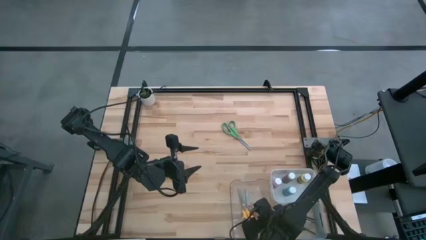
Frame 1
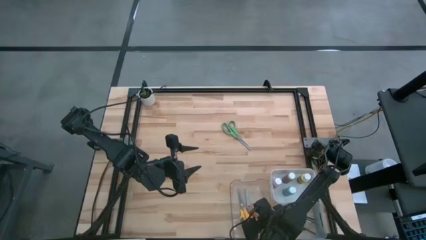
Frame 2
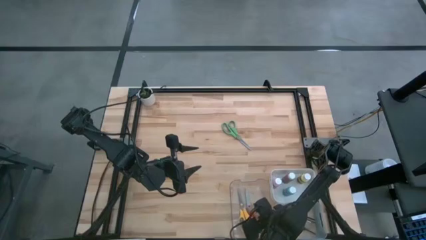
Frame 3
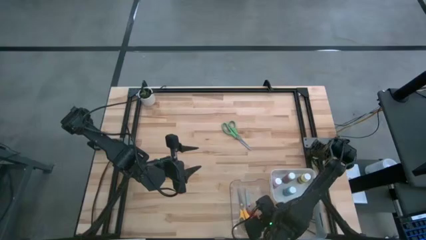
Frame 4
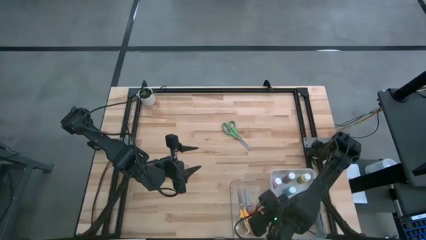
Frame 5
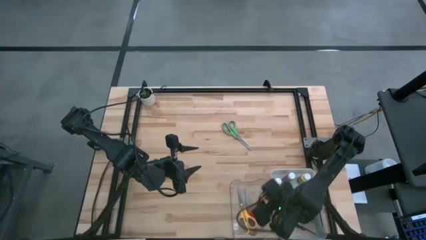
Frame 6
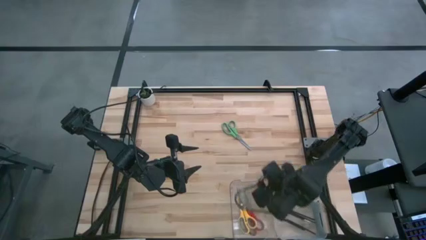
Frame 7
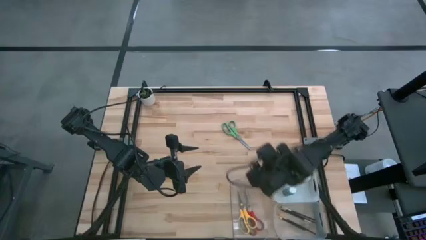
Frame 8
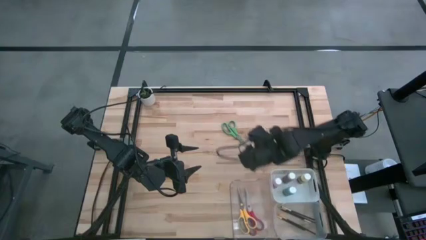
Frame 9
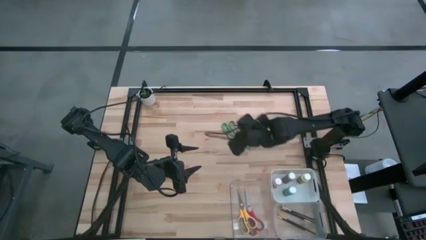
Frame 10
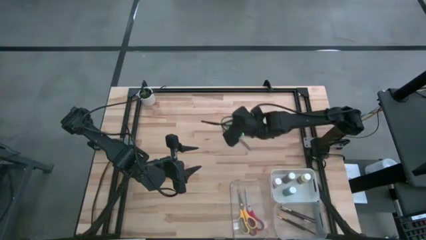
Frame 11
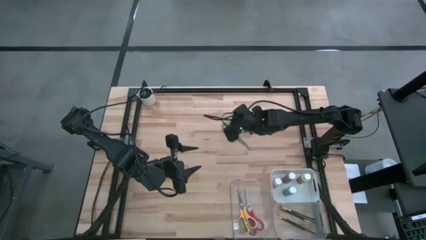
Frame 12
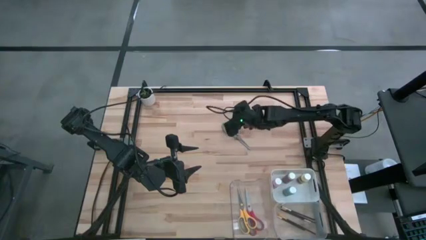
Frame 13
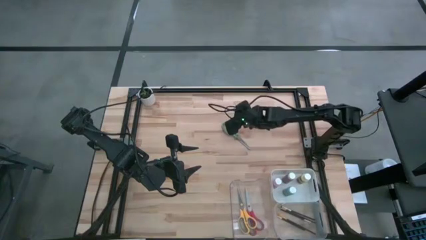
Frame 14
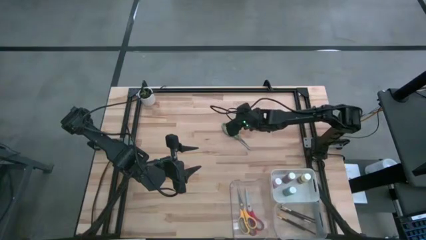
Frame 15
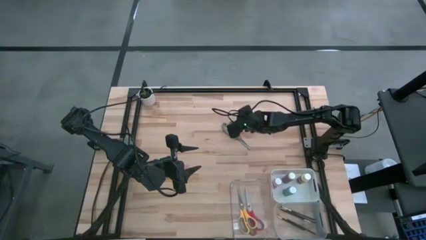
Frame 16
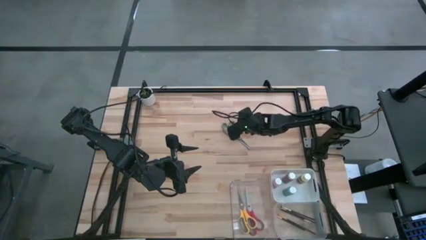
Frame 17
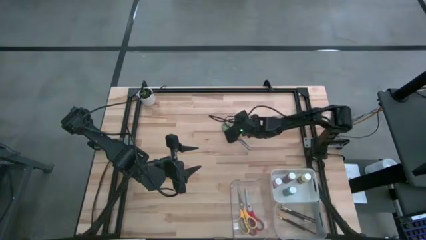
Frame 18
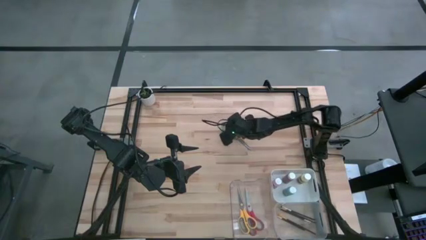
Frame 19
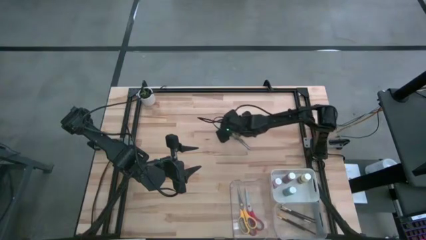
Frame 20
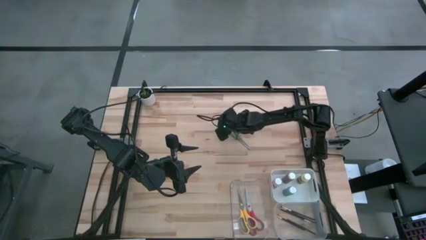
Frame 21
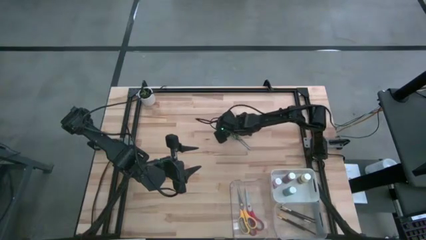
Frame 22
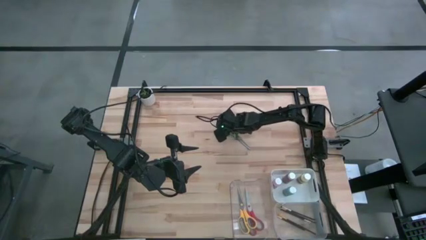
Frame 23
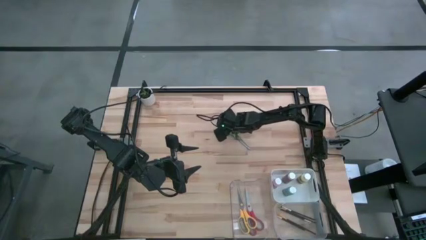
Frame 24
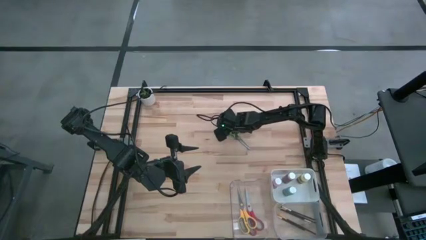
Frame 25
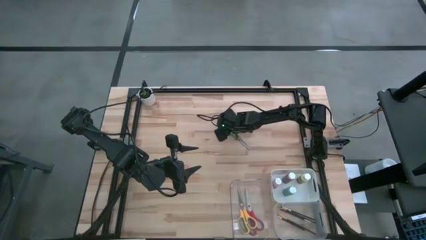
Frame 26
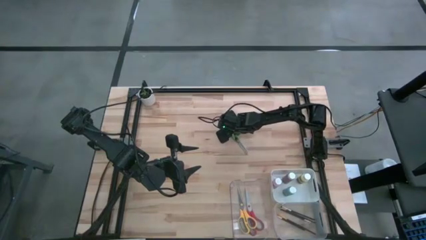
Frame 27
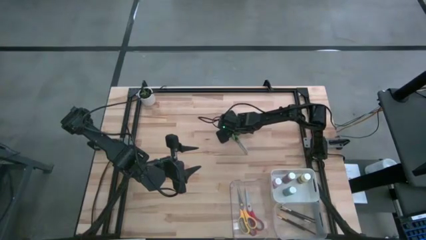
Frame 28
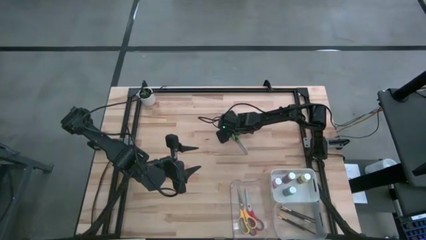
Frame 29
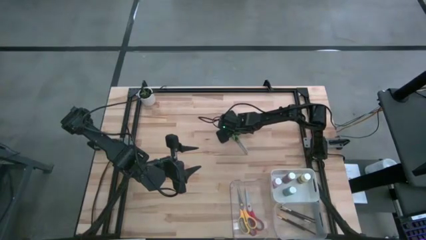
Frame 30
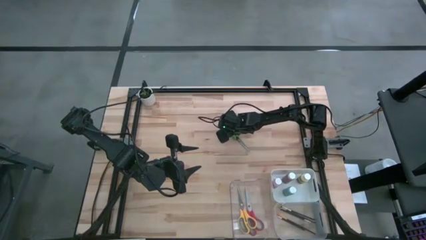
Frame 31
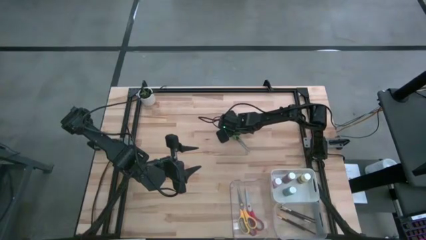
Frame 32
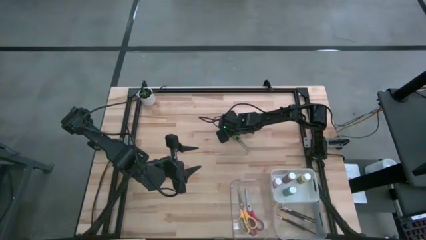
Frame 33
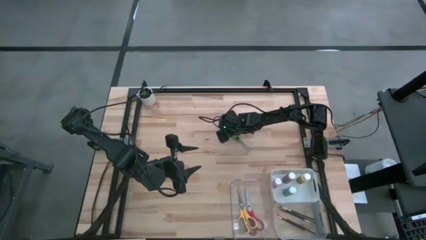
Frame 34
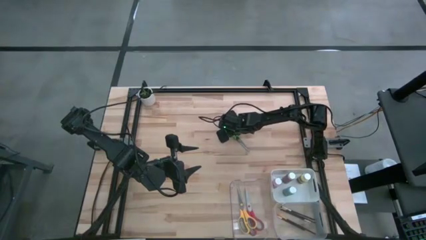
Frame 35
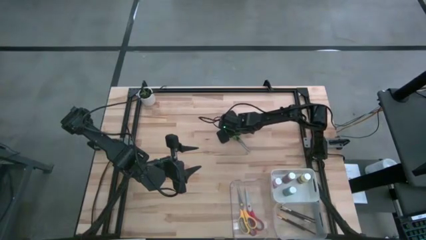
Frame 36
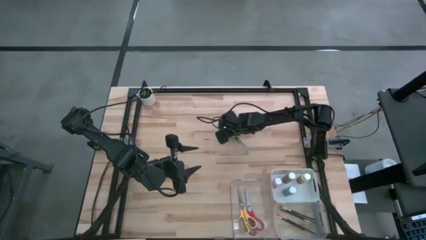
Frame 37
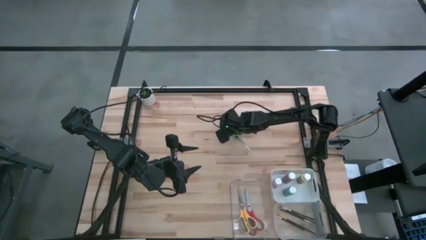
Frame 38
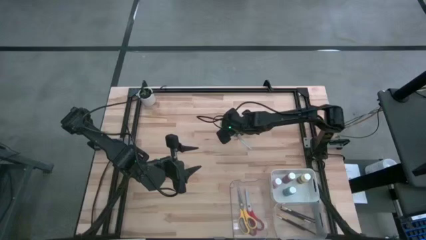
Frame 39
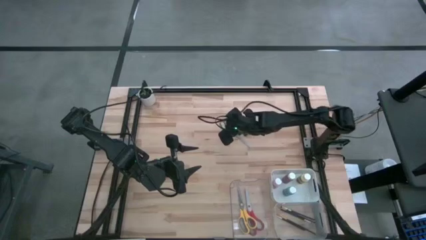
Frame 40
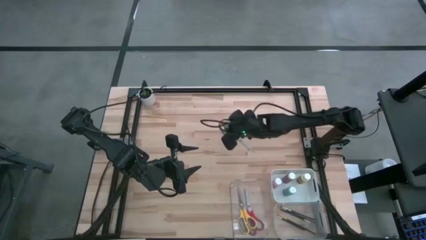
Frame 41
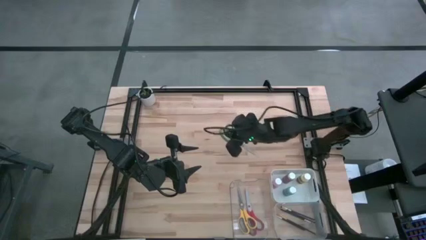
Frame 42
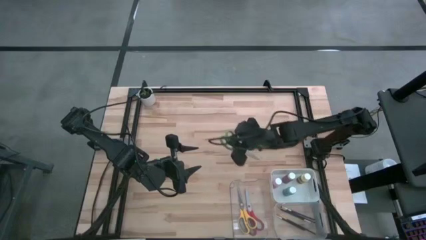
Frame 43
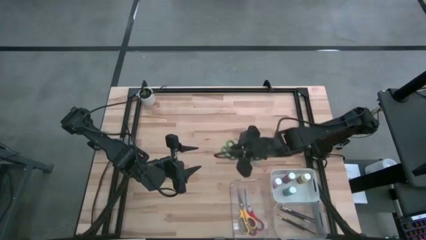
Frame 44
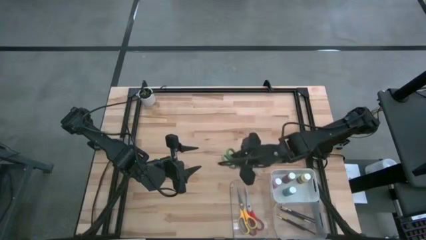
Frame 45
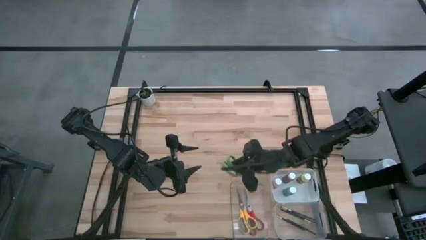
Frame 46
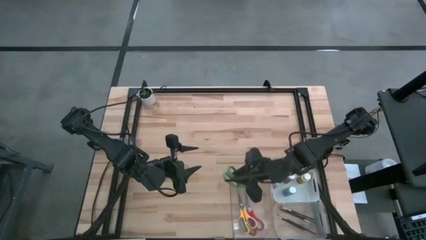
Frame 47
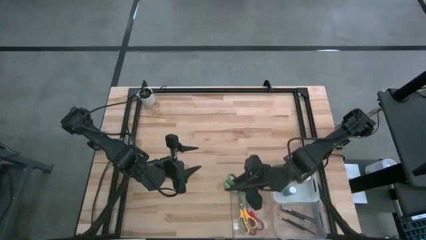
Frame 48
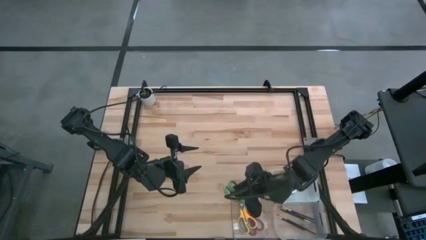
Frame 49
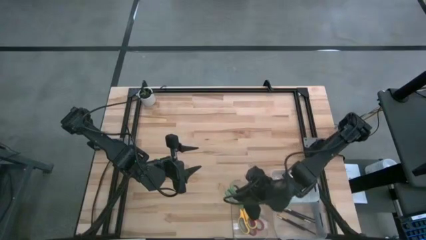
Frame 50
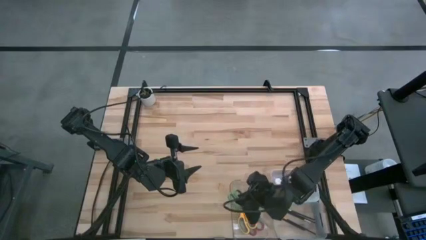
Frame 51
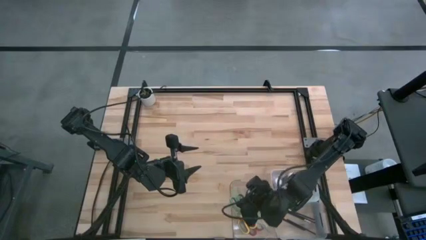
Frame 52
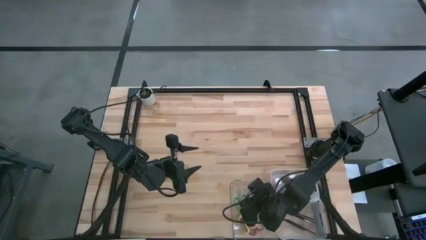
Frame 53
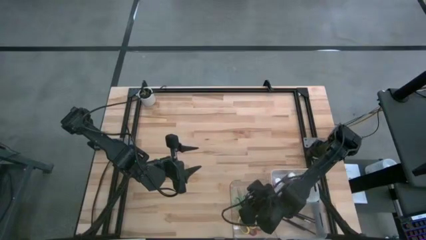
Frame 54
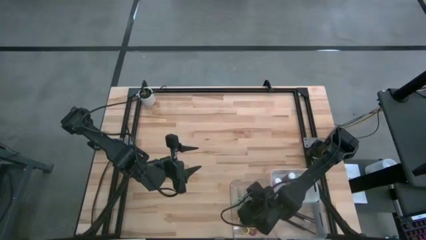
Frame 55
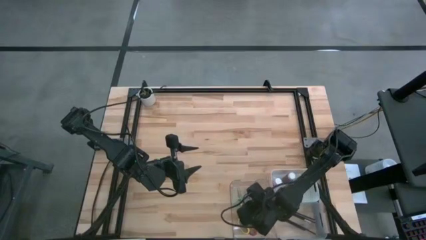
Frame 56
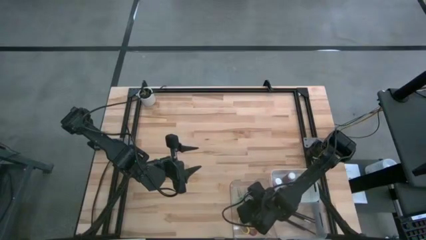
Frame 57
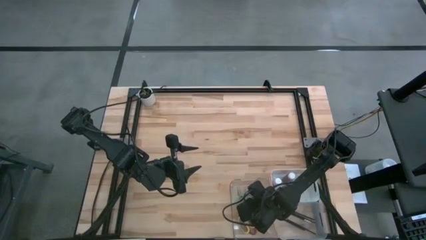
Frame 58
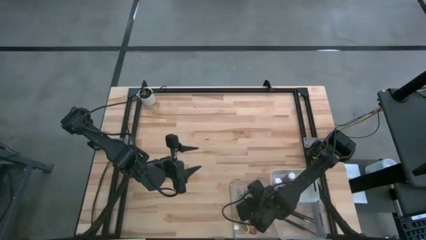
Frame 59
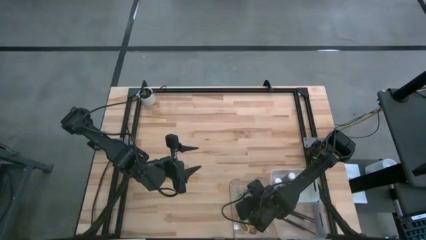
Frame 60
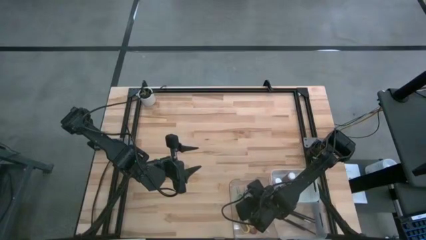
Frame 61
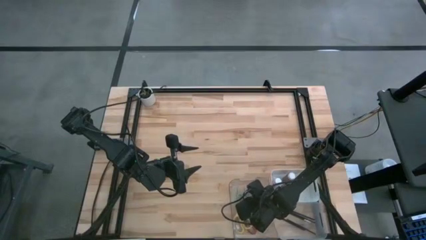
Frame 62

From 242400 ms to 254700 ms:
Task: Pick & Place Paint Supplies
Put the green scissors into the left transparent bin

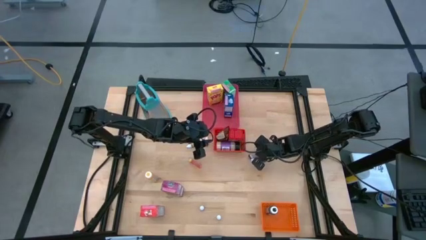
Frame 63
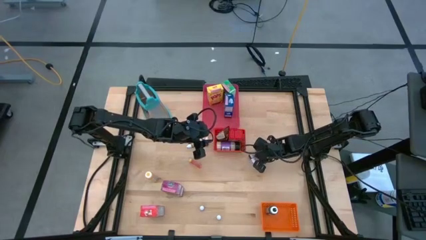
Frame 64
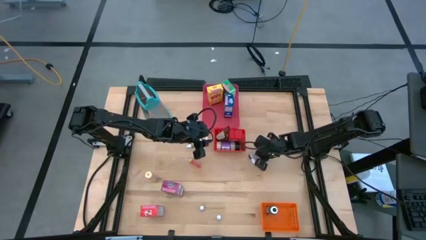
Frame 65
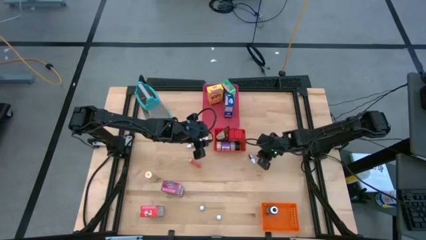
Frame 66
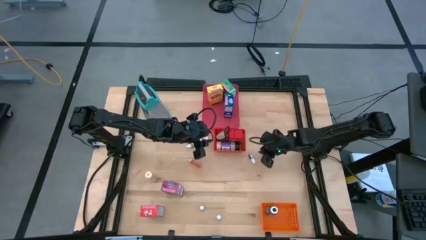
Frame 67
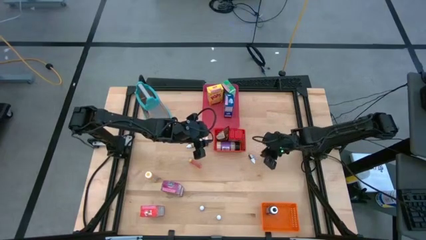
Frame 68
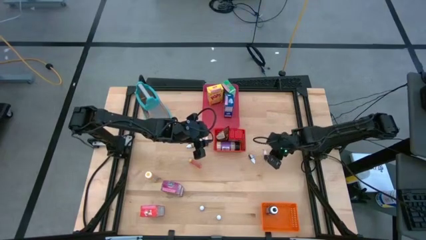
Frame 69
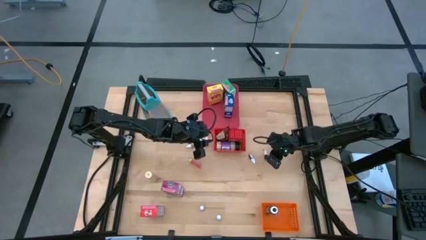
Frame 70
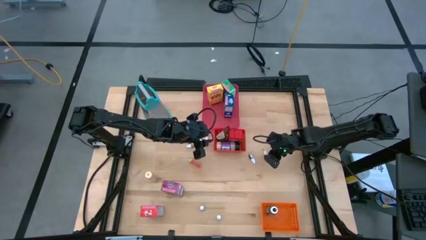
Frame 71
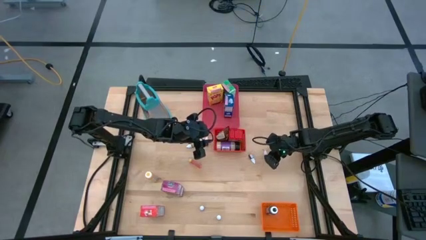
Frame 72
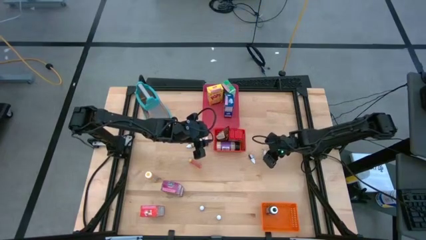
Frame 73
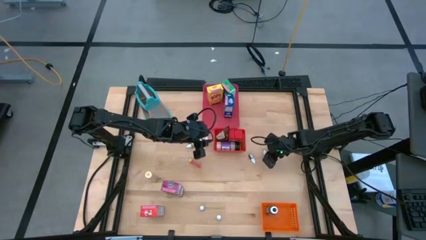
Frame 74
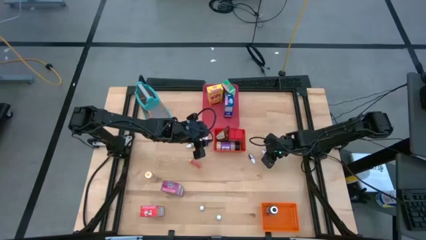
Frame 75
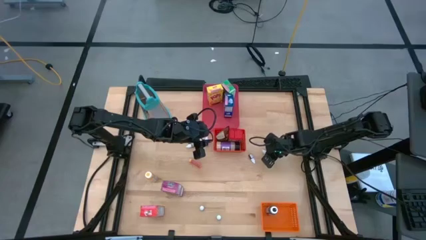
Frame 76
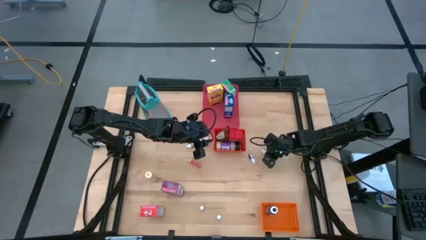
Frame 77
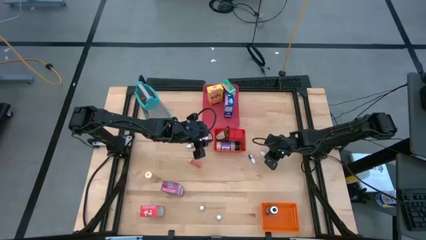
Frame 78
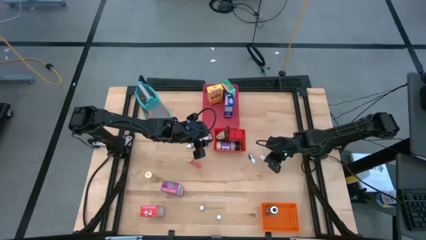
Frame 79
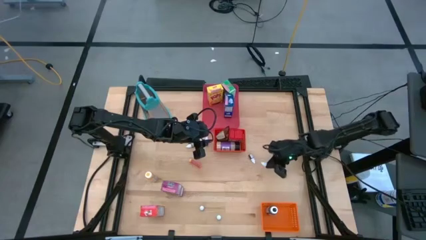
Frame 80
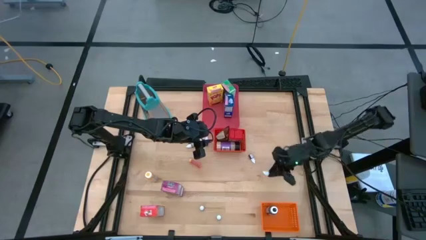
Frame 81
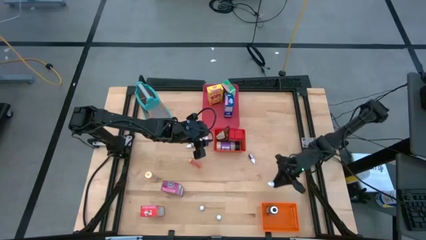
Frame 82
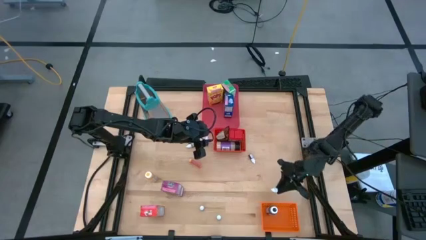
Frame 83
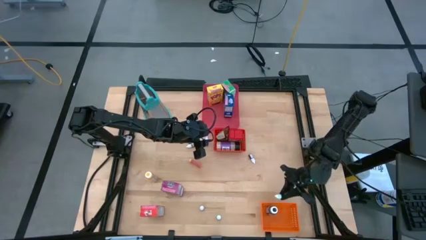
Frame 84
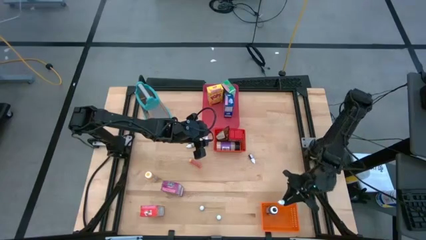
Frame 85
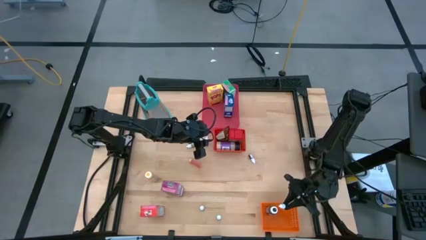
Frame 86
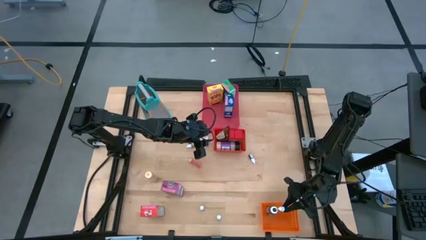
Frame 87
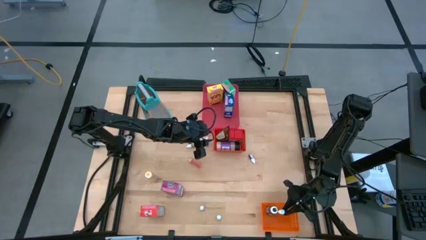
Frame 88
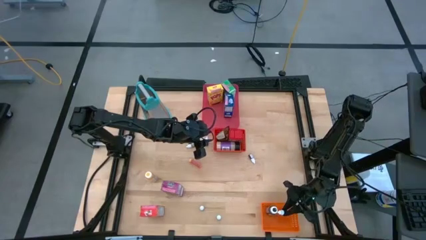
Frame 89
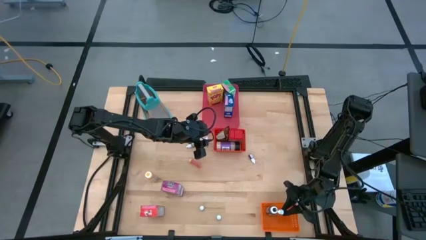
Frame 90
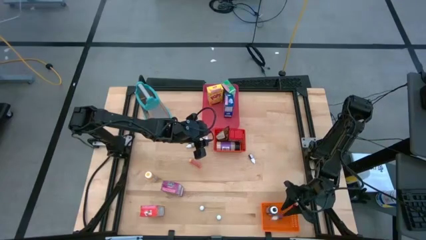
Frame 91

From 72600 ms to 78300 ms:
Task: Pick & Place Kitchen Items
Put the violet food coloring bottle into the orange bin
